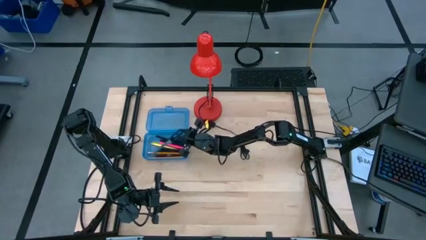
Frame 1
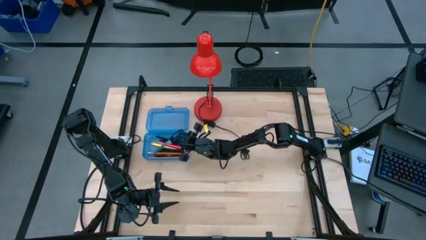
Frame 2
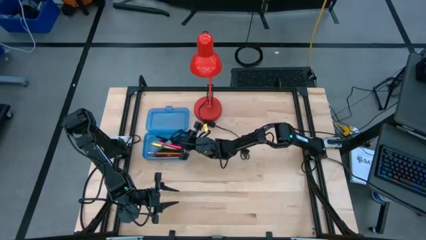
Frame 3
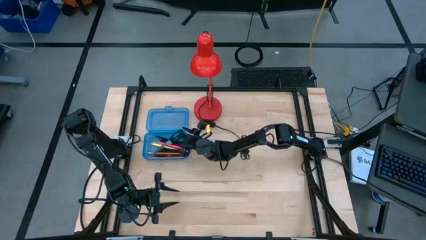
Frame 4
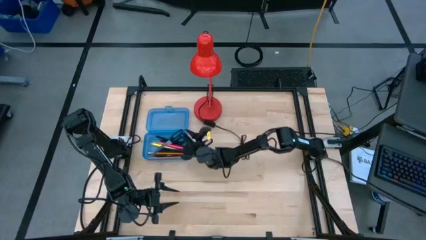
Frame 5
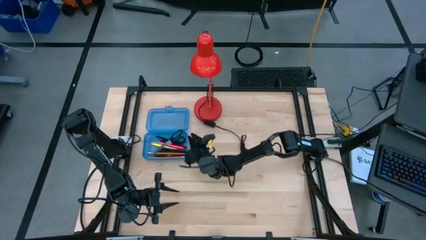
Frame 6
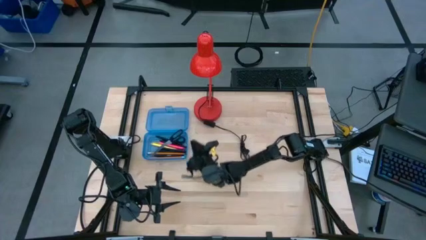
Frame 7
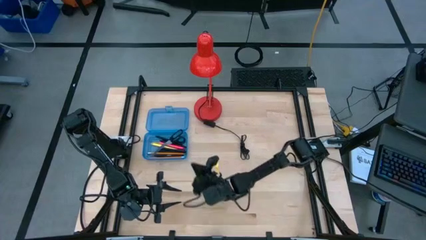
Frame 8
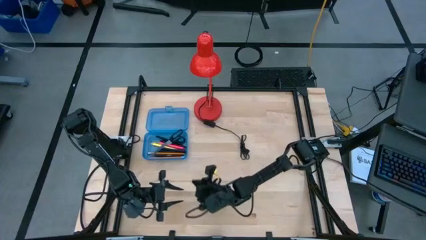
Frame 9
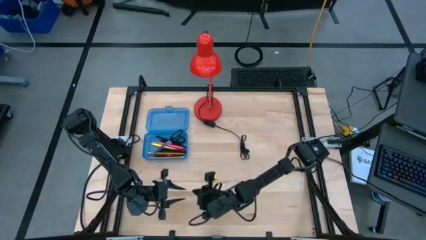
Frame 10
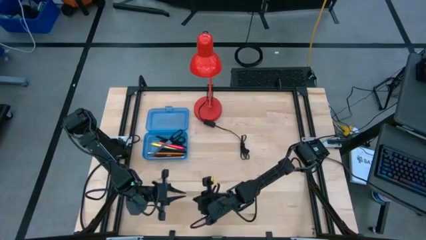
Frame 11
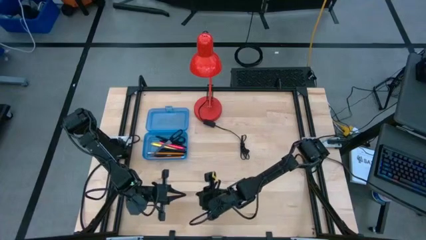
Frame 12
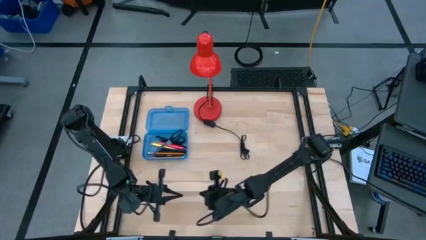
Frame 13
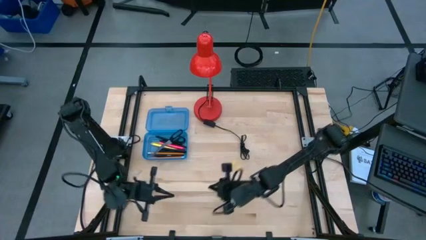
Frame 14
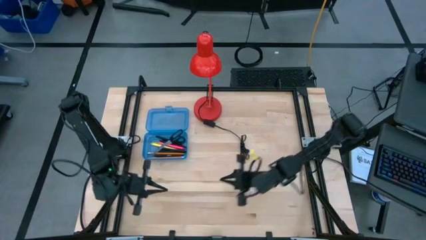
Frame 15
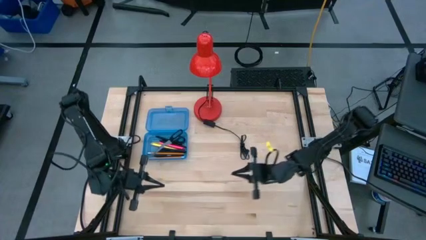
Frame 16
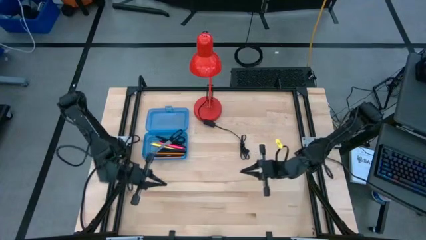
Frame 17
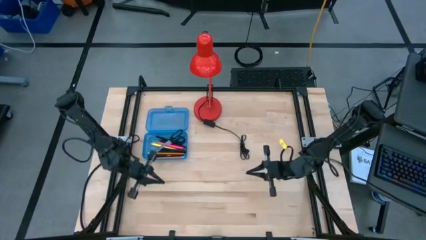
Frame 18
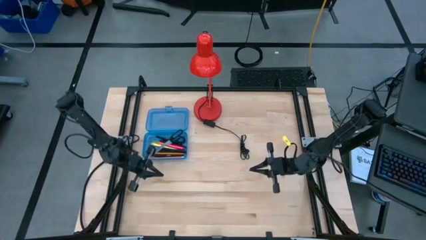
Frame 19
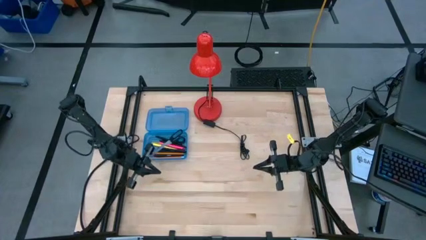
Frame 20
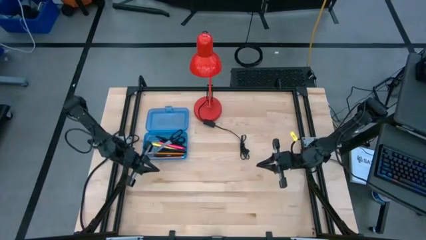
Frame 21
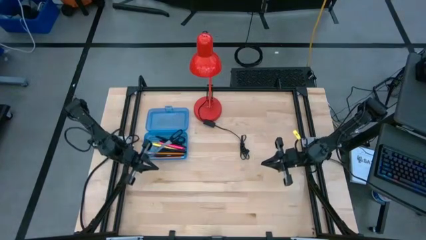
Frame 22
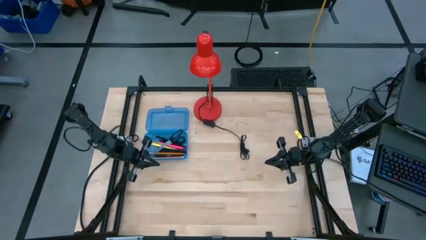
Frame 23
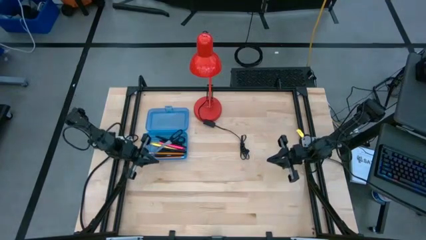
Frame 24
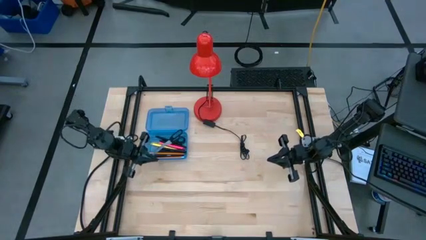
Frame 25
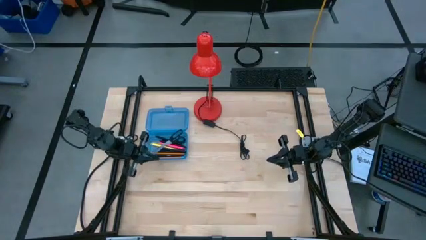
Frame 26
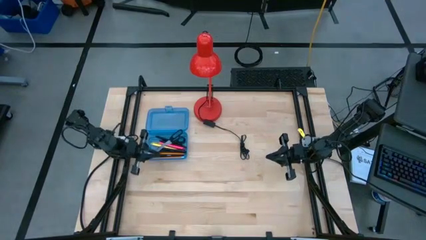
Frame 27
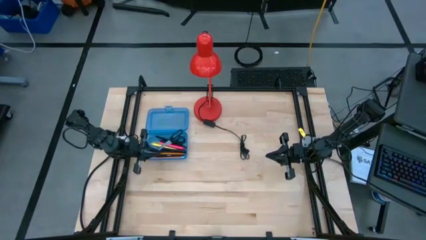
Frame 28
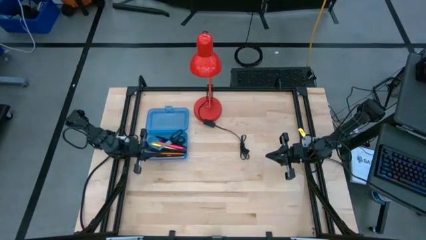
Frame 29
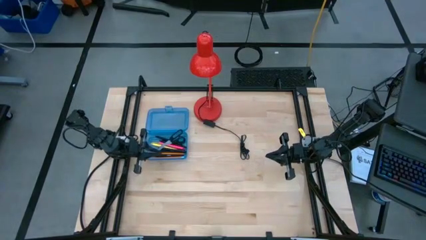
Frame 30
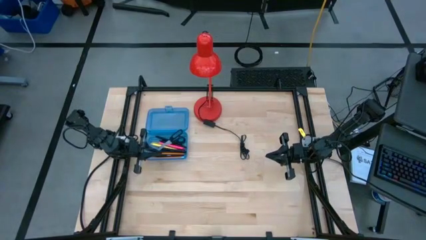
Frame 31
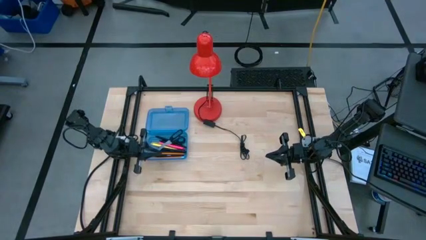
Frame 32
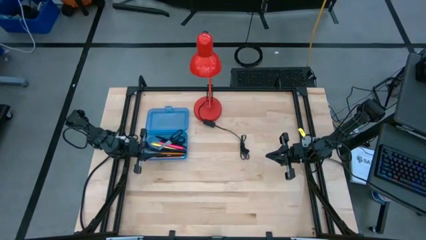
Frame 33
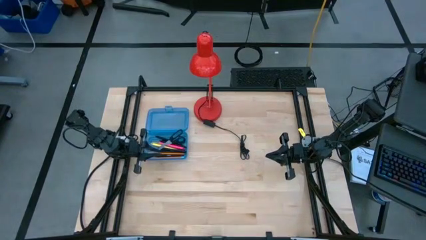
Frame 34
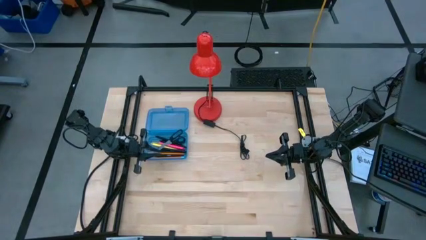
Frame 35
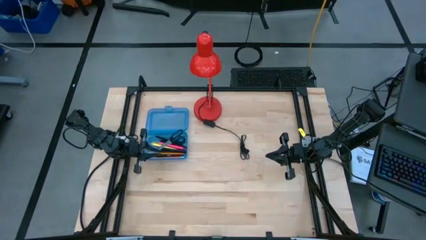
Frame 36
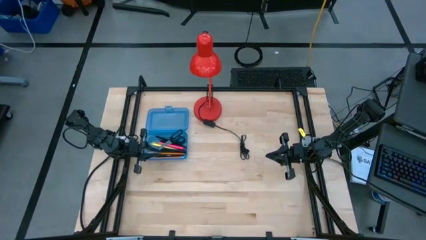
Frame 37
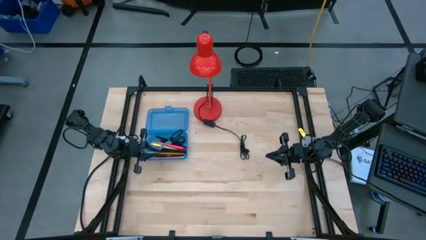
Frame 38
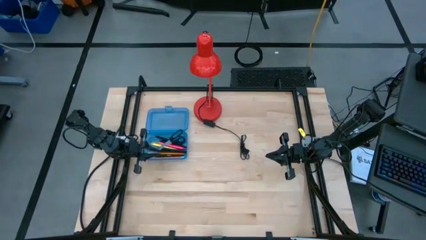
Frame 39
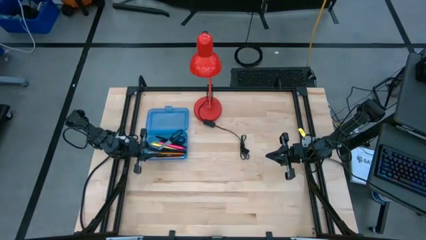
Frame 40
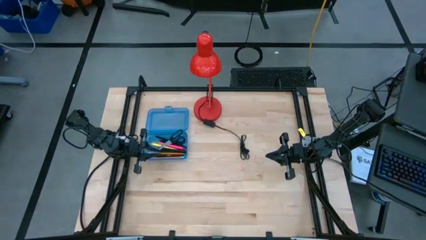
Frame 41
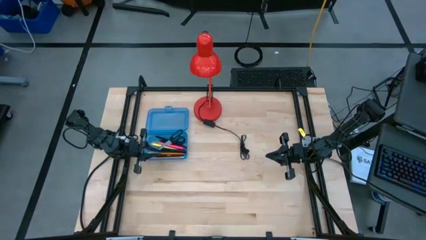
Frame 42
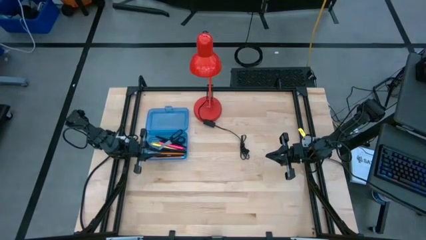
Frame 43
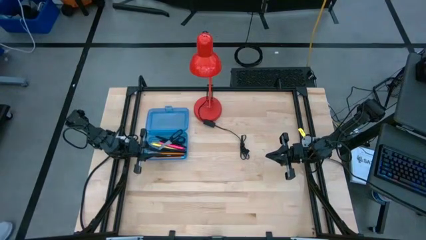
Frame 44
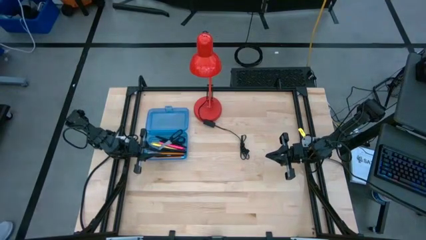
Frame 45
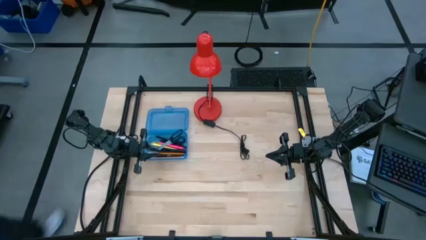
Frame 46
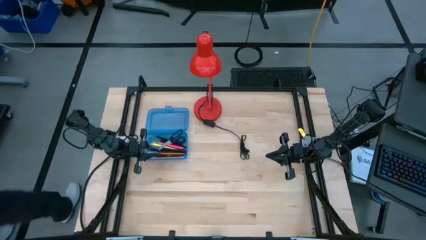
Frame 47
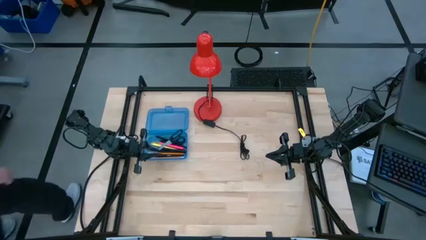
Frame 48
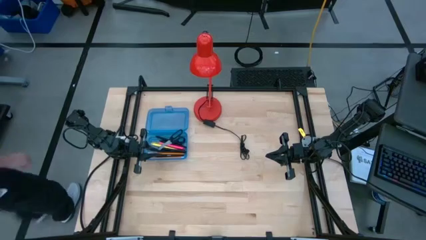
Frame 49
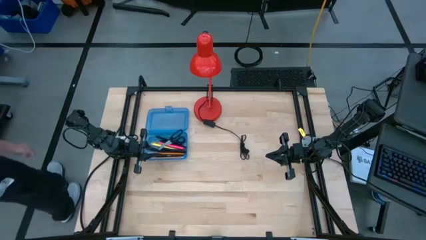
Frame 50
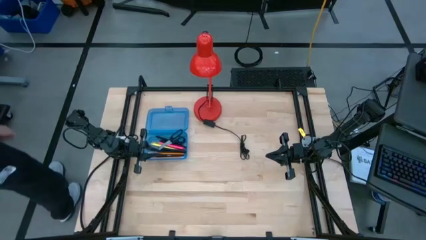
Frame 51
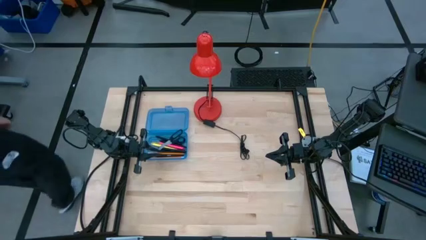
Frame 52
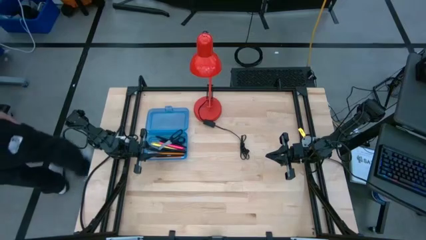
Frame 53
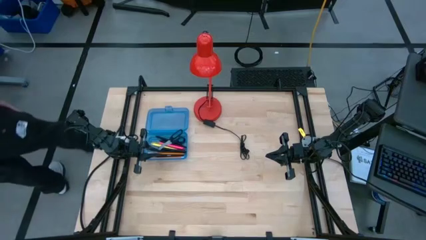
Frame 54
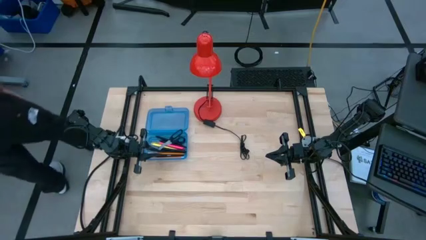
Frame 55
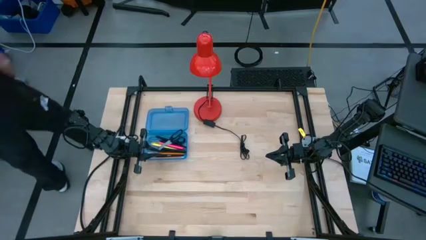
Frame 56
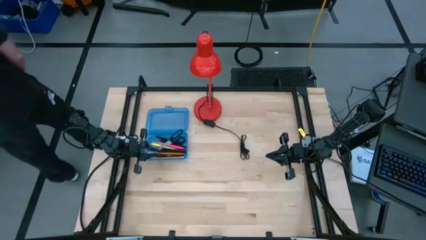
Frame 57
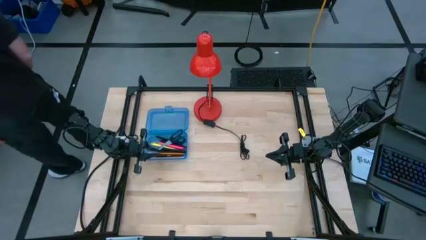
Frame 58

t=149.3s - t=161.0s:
Task: Pick & place school supplies into a supply box
Return to Home Position

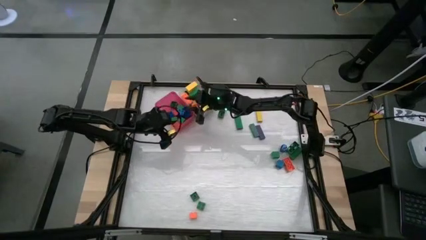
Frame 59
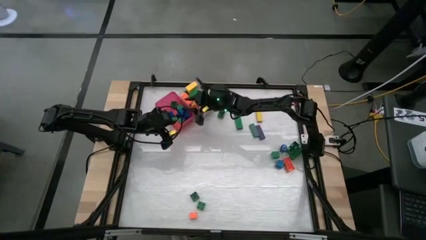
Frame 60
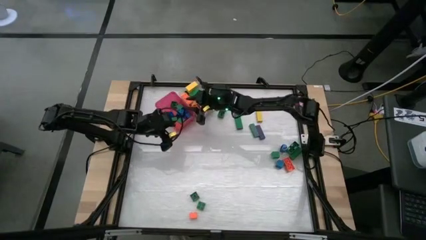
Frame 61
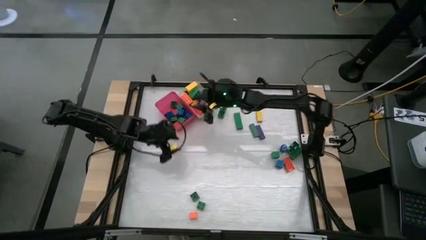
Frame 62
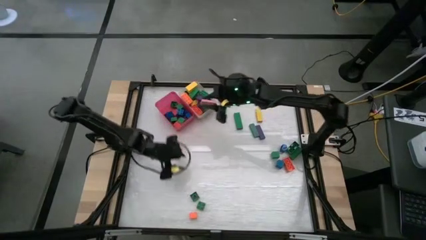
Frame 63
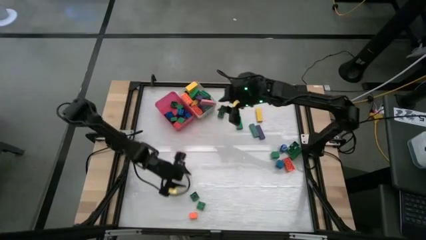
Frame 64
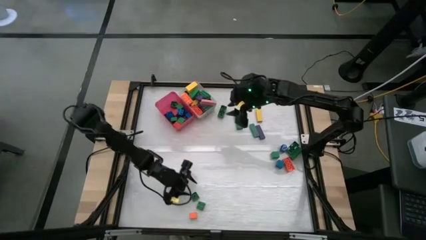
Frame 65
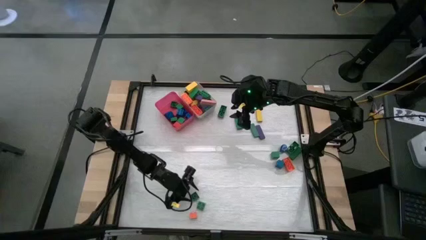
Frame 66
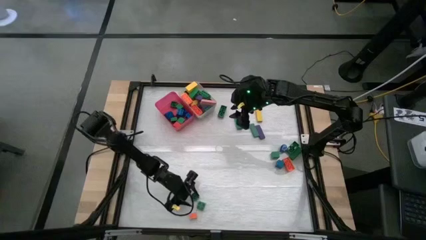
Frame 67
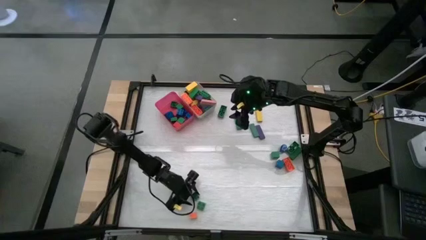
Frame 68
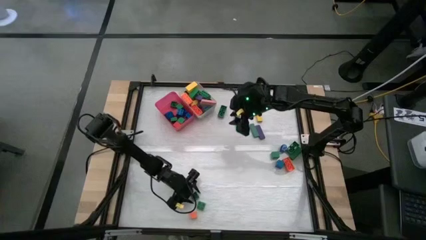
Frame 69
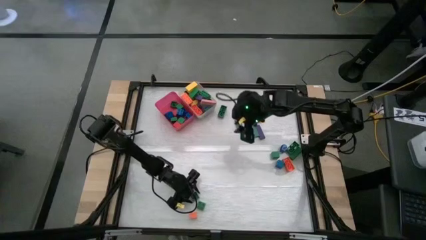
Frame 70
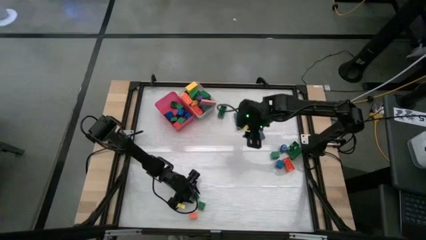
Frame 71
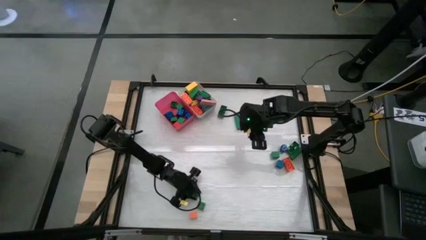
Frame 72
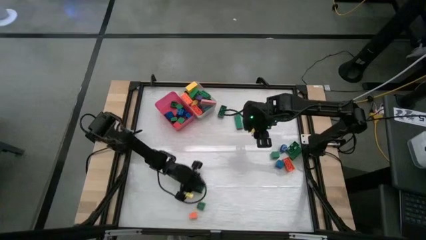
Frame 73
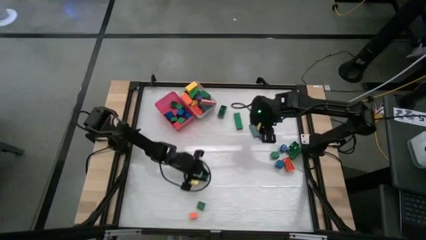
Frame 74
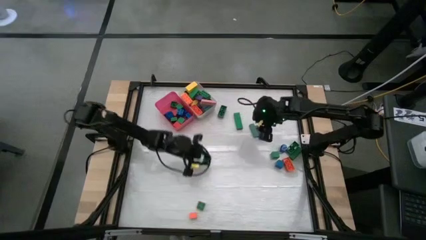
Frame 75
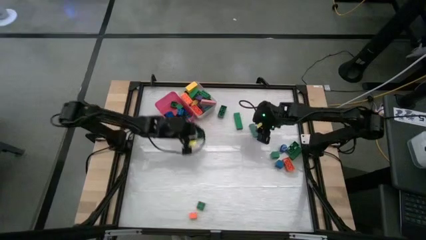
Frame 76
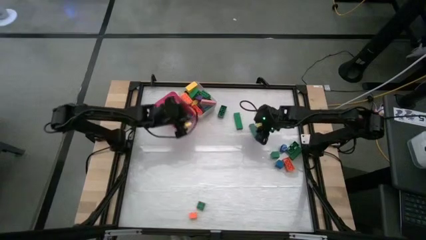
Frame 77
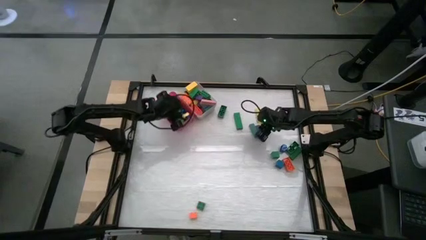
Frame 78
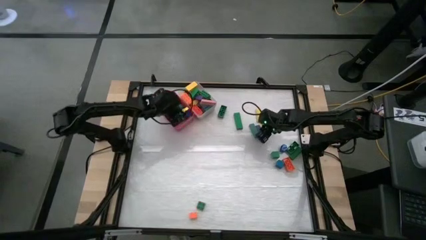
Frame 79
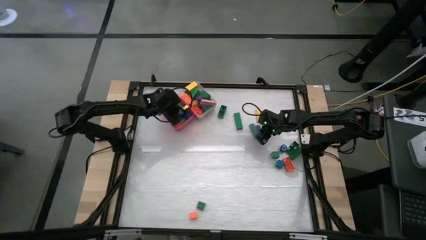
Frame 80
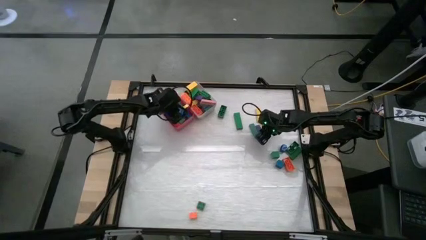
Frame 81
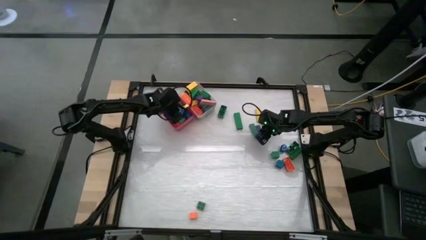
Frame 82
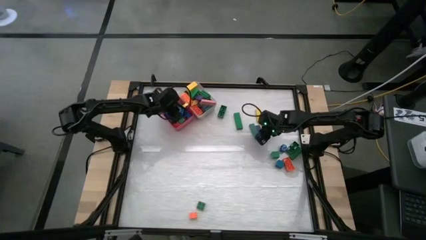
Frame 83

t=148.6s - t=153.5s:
Task: Sort blocks by size
Put the small green game piece into the pink bin

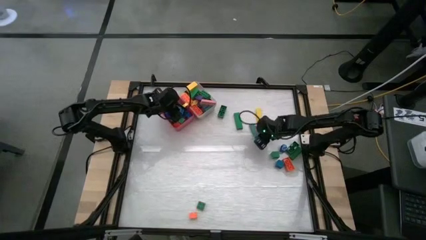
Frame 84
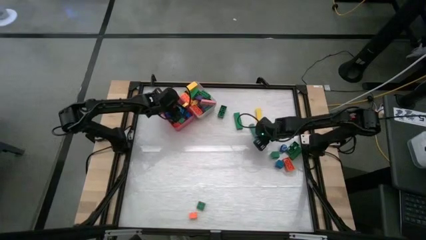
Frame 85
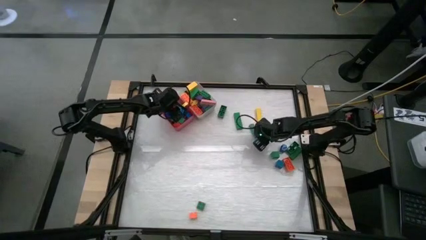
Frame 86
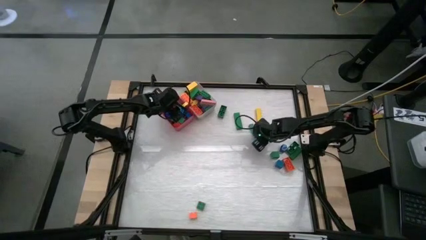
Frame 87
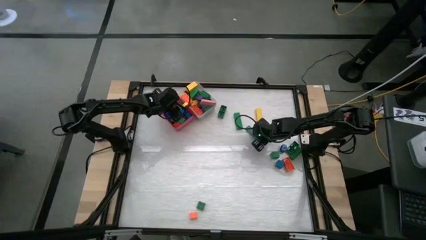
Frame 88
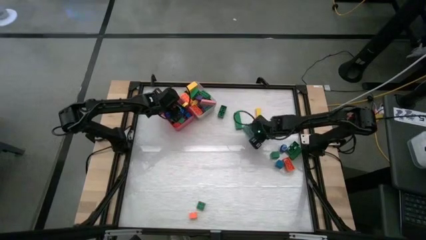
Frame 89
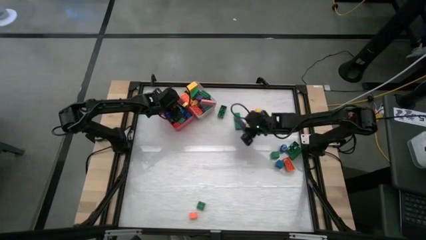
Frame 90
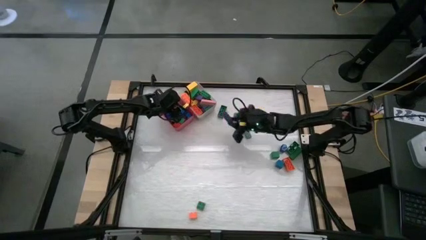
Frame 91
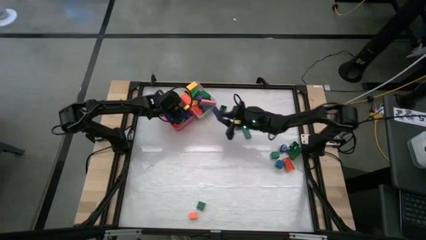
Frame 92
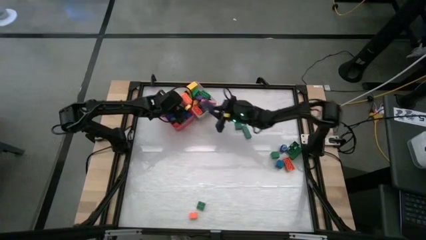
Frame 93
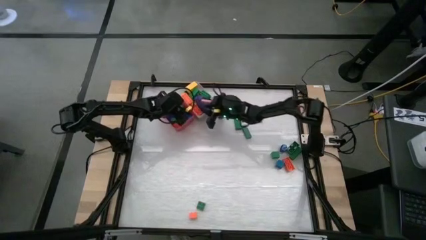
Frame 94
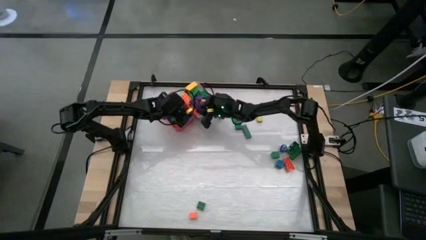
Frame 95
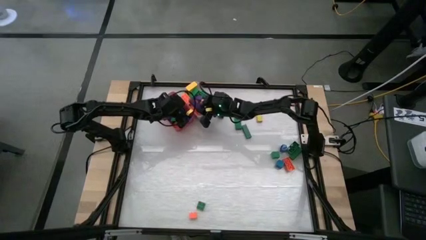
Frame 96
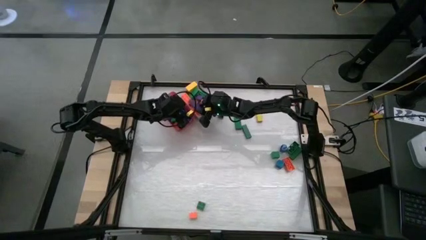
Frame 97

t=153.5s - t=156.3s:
Put the big purple block into the white bin
